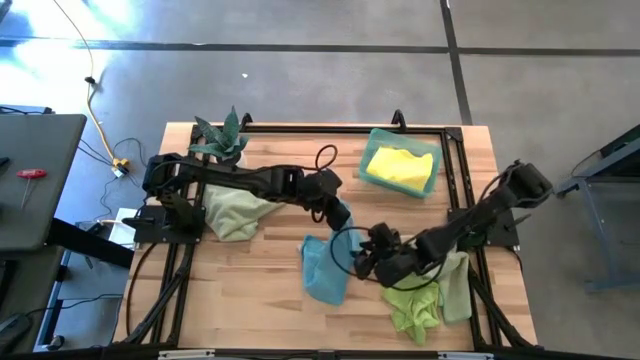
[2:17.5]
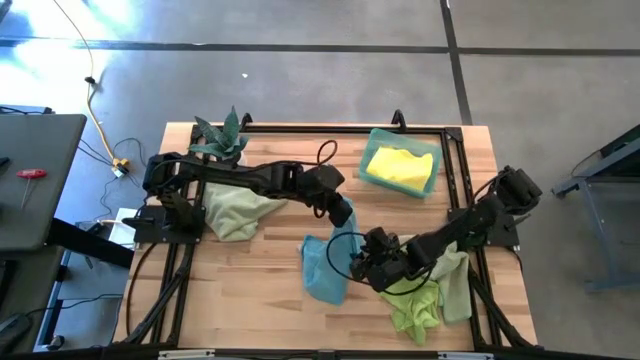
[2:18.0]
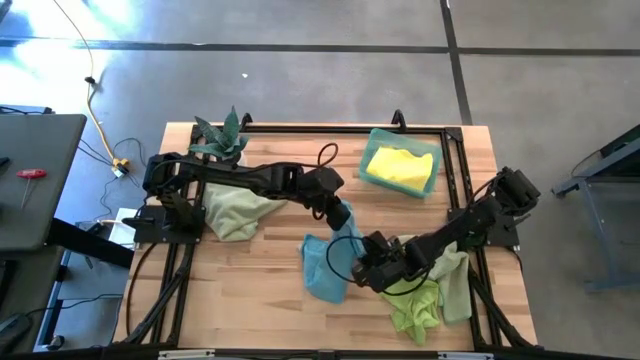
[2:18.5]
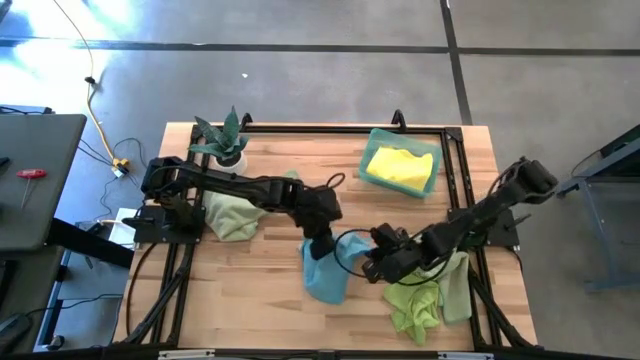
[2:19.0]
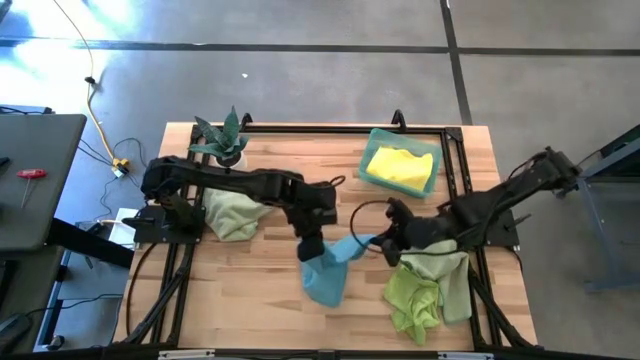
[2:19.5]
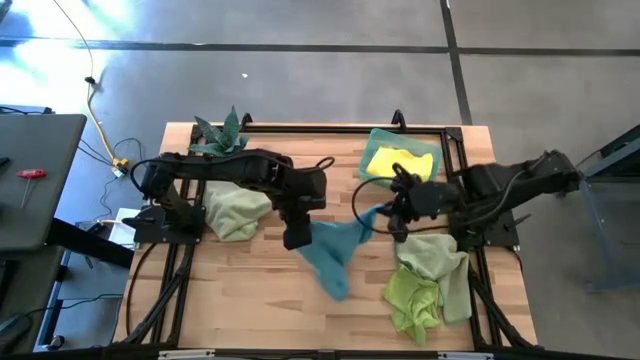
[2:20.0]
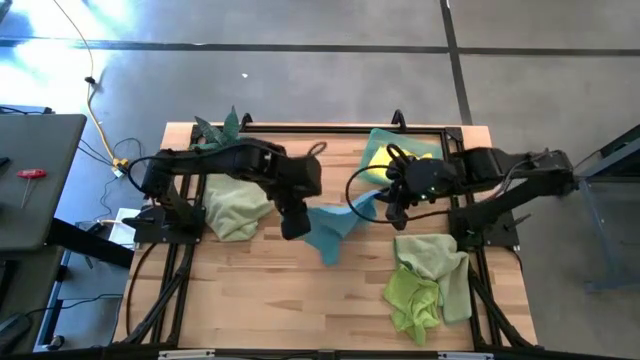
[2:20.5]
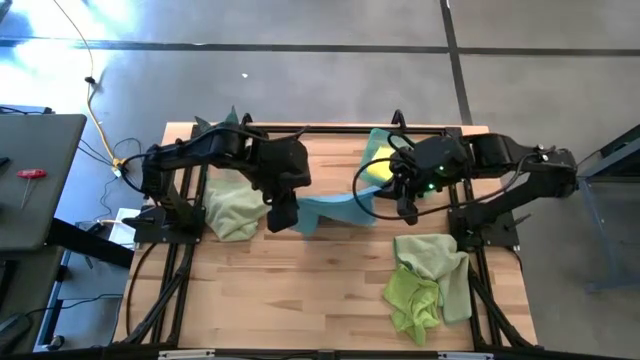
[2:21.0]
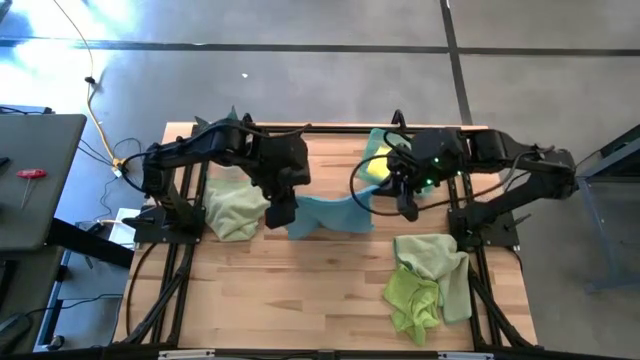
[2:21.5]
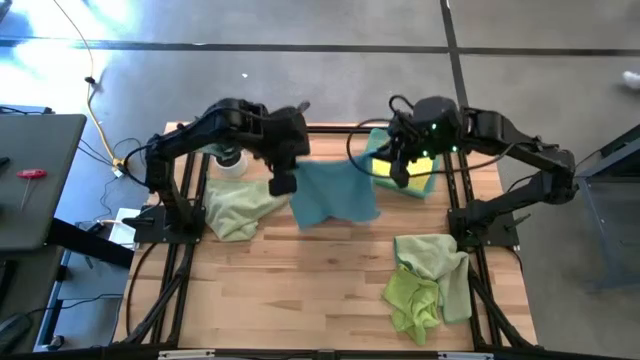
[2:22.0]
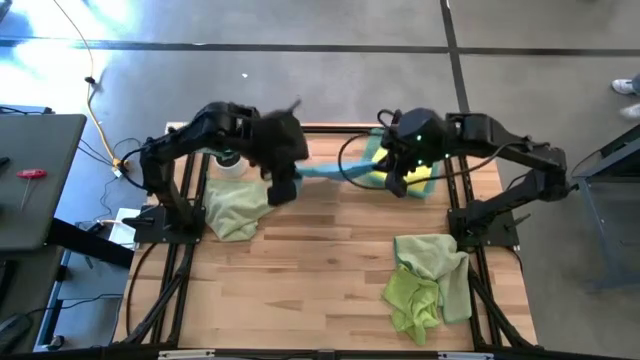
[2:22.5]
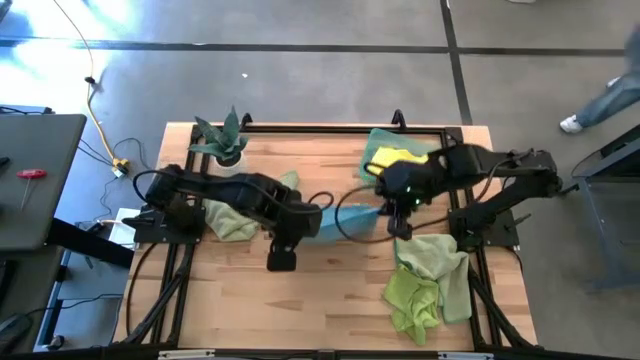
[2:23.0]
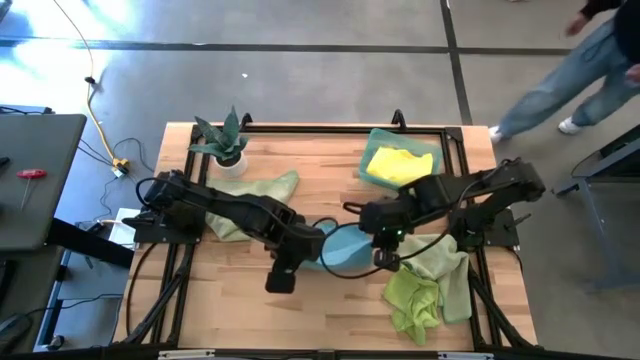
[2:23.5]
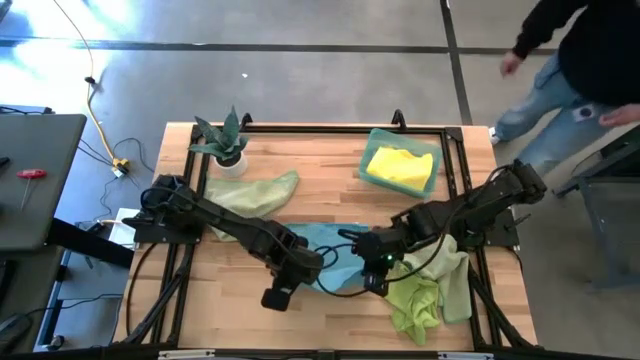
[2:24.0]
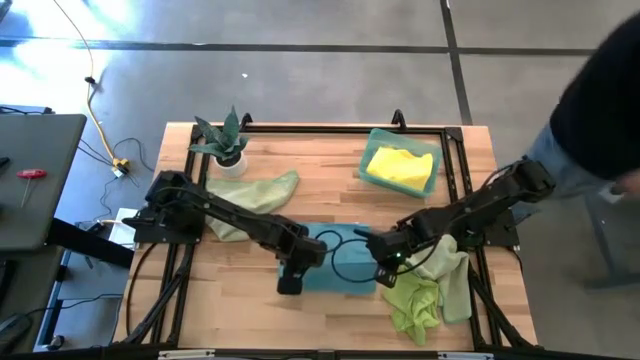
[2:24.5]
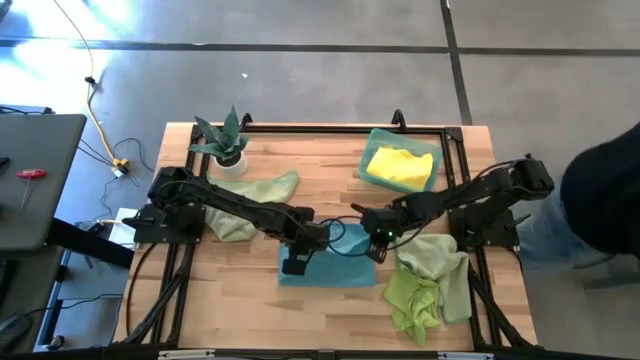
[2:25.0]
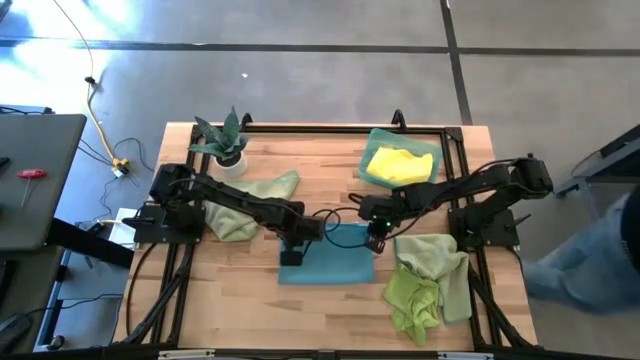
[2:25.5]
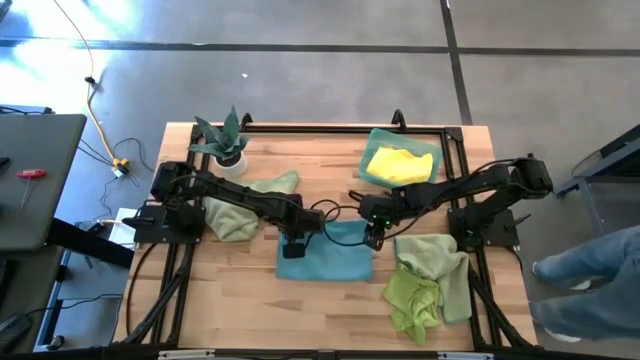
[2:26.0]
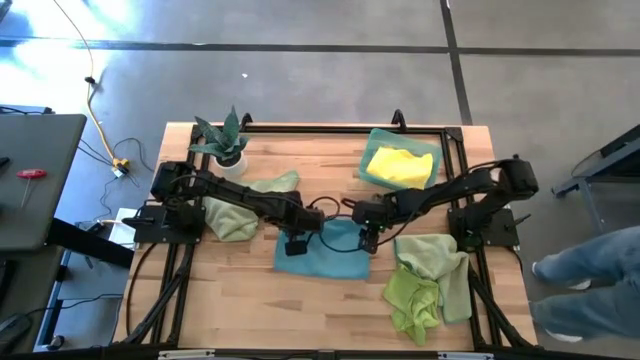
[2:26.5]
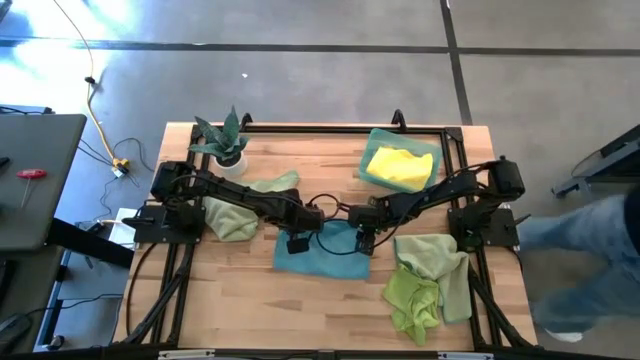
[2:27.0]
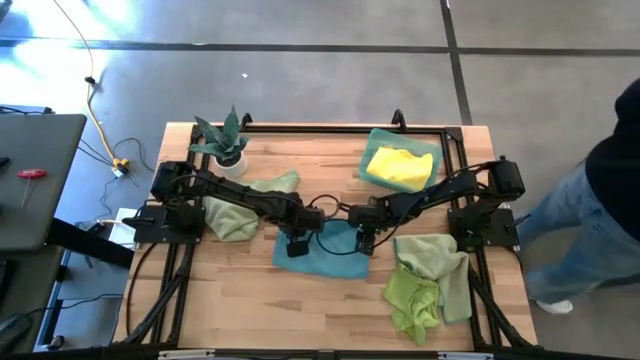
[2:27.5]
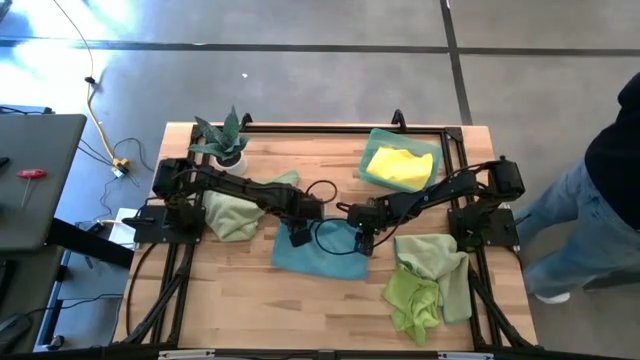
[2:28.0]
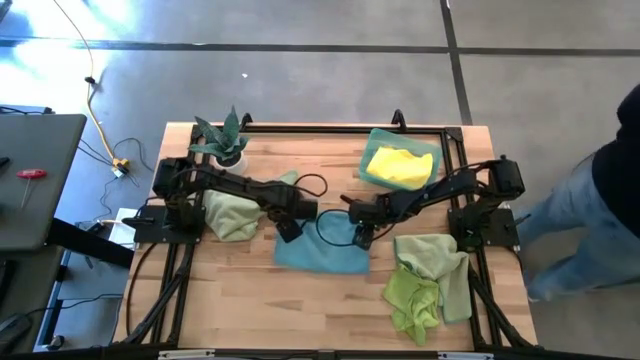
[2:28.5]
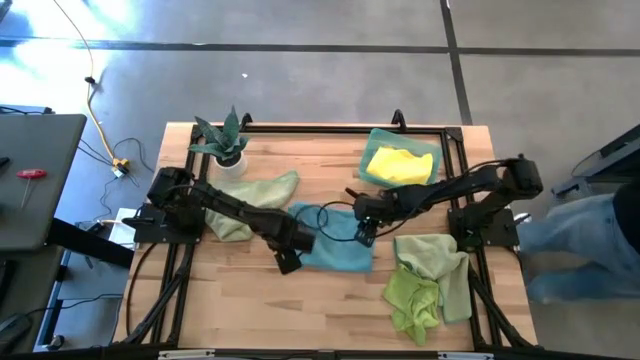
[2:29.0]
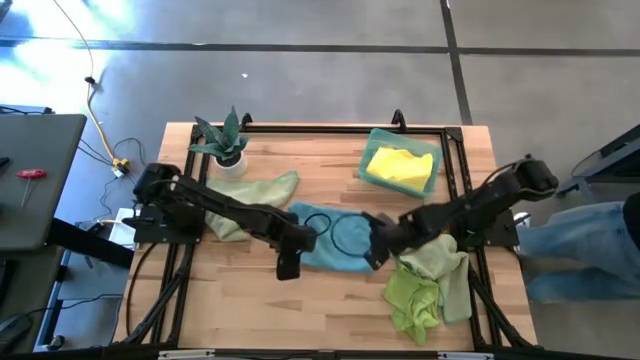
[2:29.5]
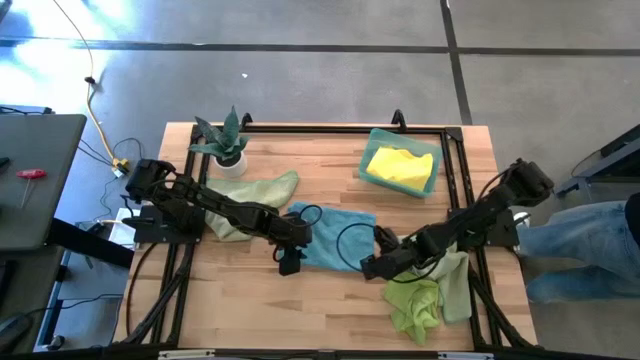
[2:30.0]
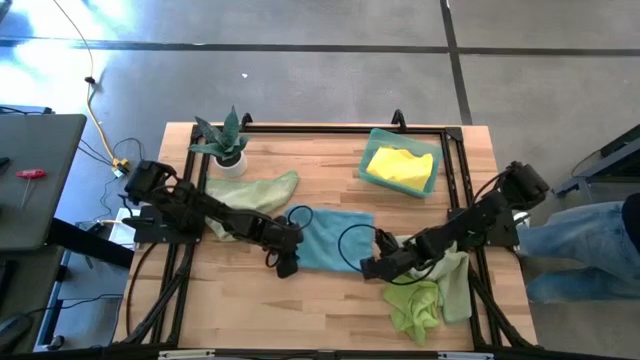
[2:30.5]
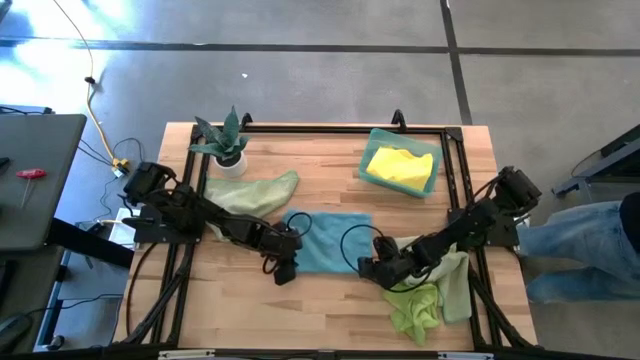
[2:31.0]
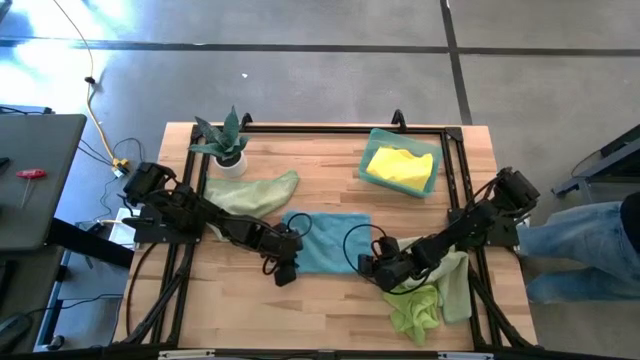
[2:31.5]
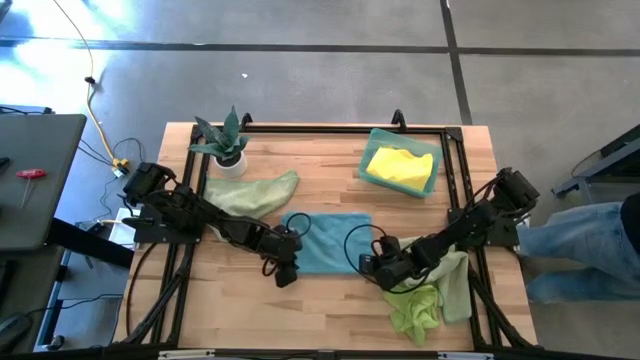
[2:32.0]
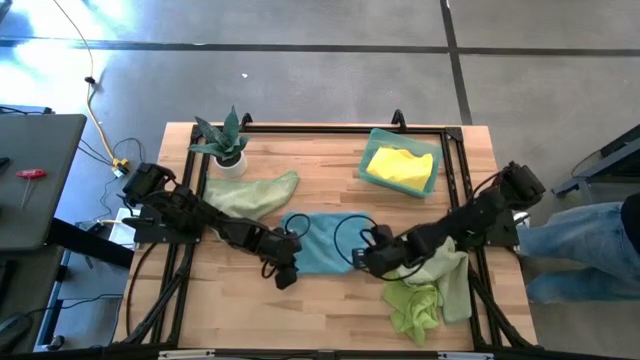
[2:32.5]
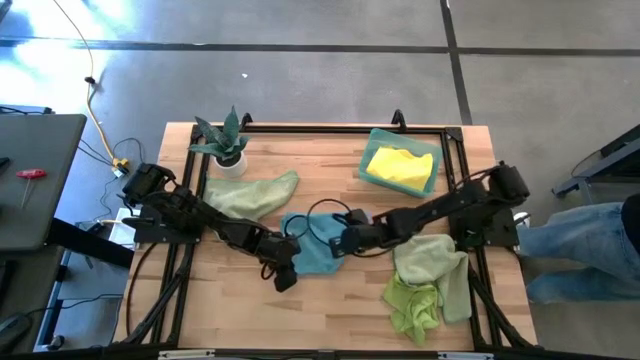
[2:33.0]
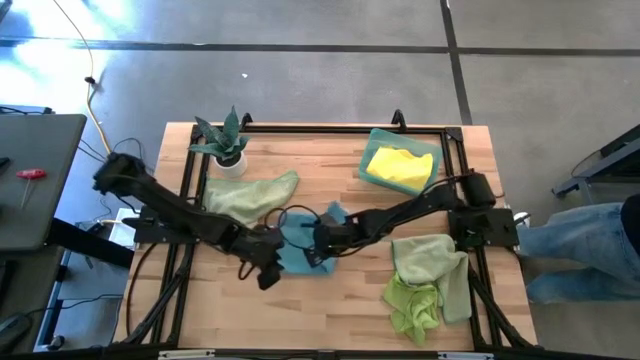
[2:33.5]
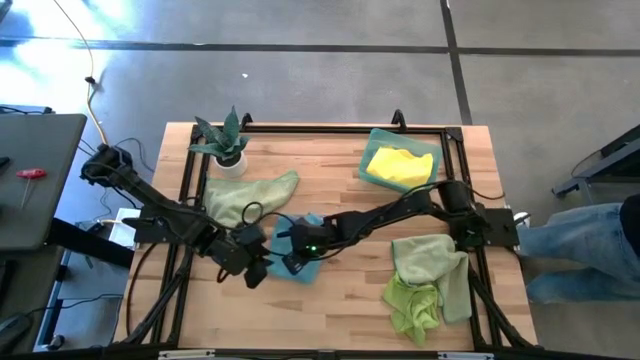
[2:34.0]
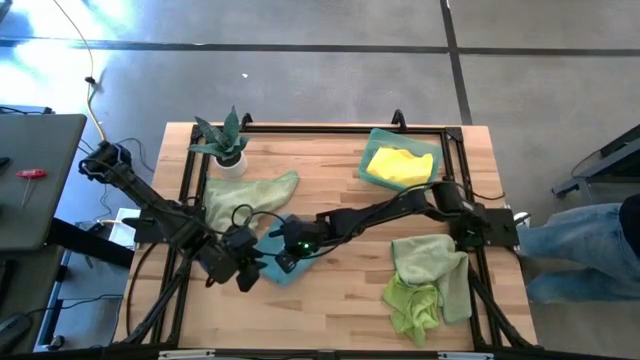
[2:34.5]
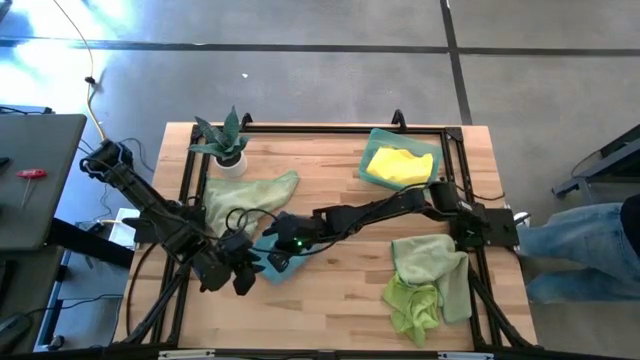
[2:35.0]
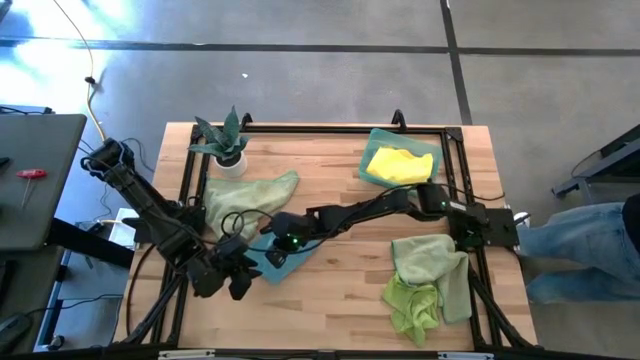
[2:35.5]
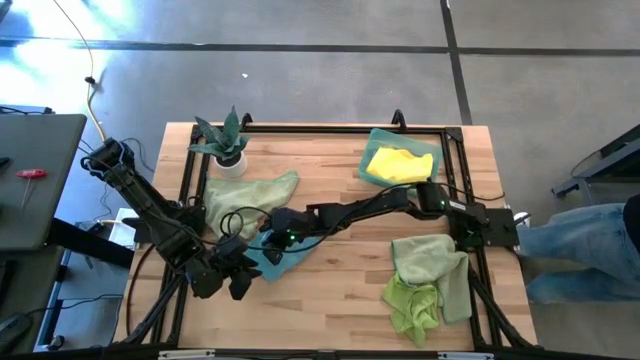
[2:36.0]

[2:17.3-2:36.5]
Task: Fold microfiber towels
Fold the blue microfiber cloth

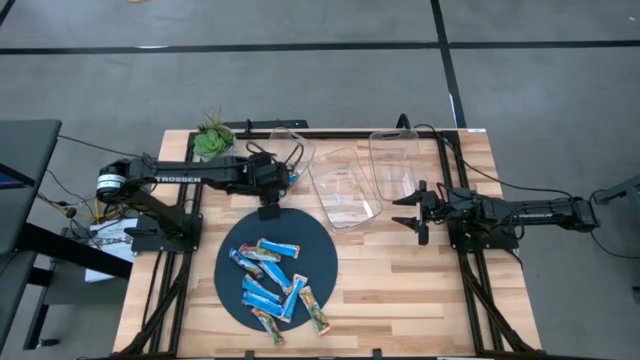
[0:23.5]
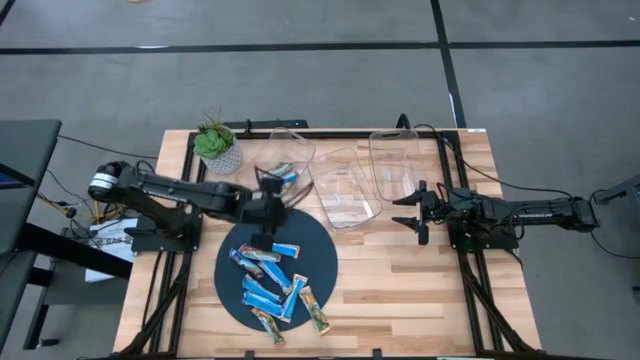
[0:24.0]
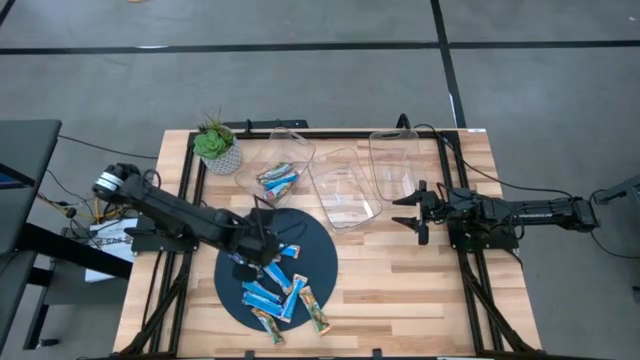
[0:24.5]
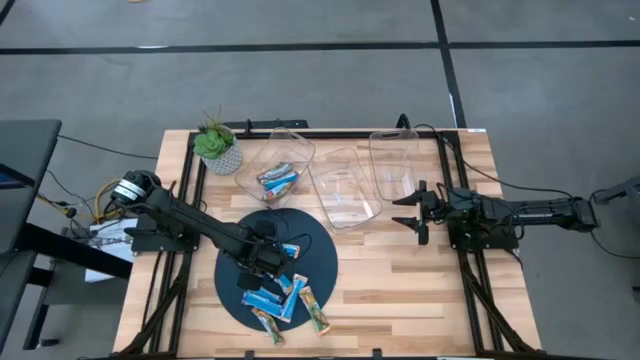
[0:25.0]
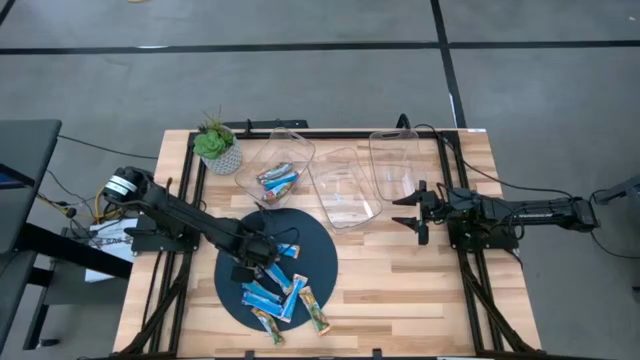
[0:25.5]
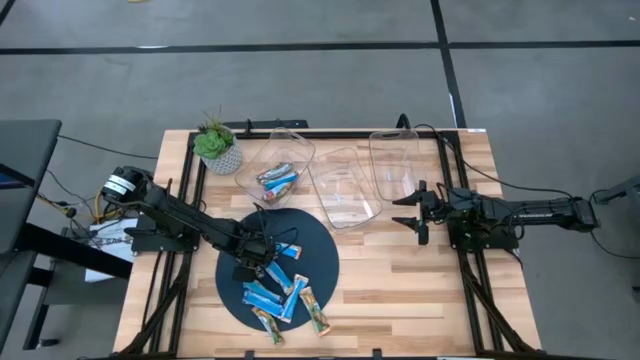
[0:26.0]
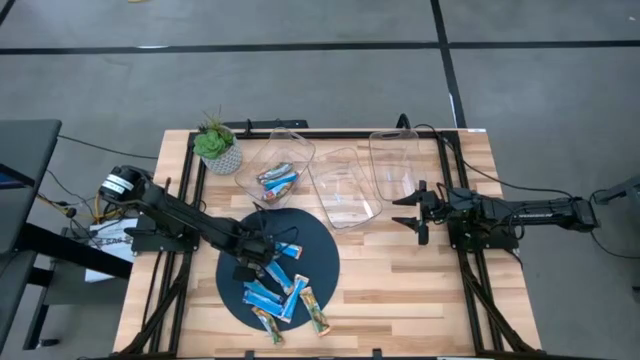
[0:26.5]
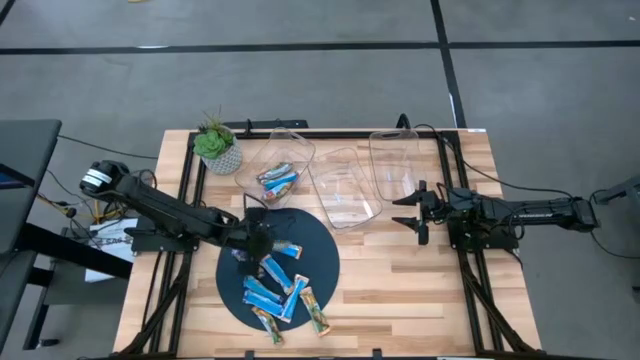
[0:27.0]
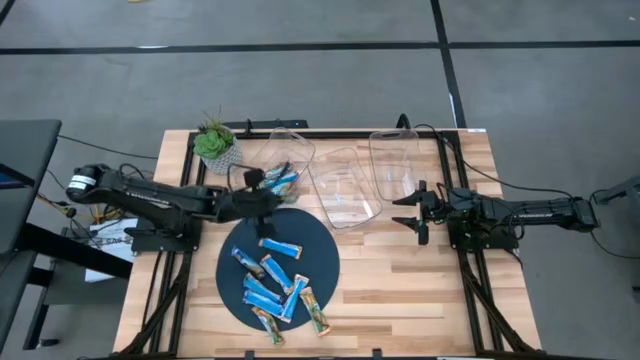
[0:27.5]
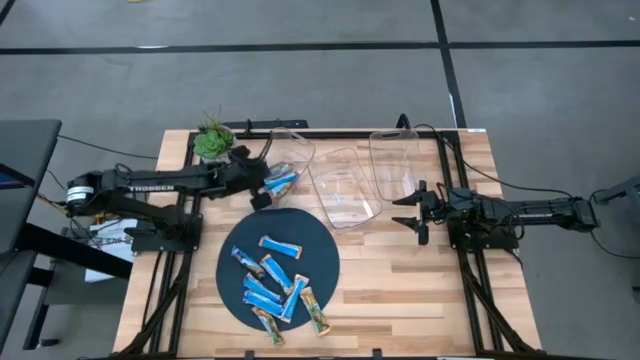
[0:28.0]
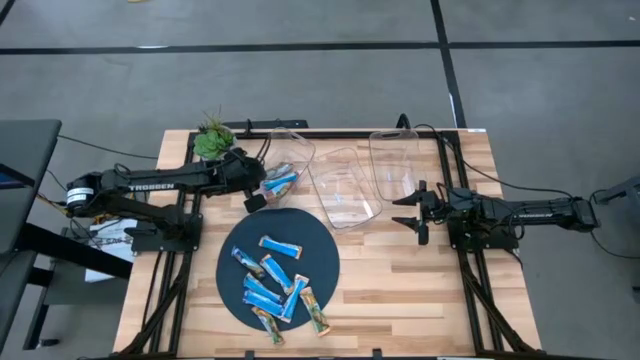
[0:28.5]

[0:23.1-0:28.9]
Task: Pick and place Granola Bars by type
Put the red granola bar into the left transparent bin
